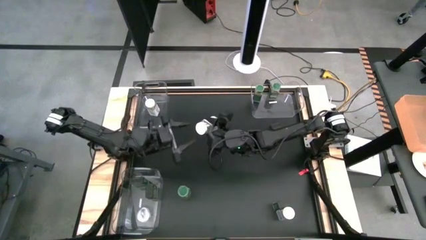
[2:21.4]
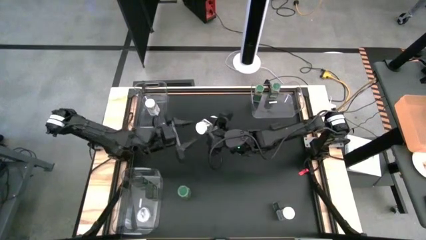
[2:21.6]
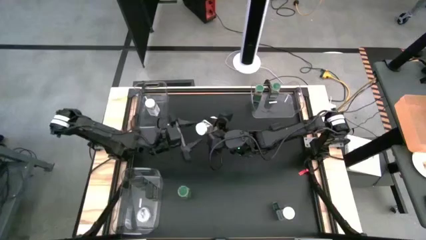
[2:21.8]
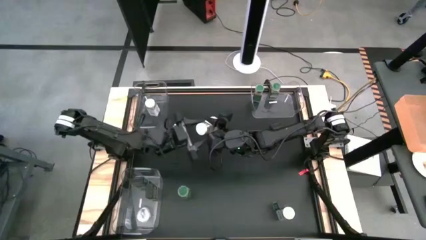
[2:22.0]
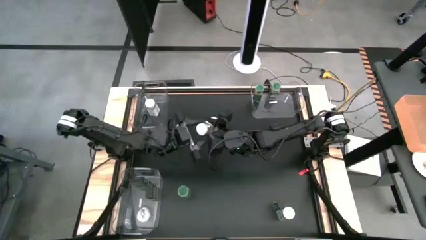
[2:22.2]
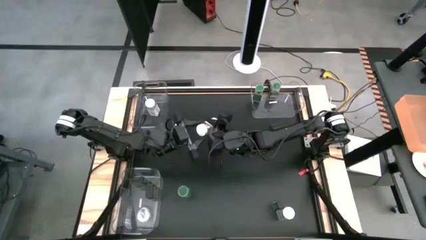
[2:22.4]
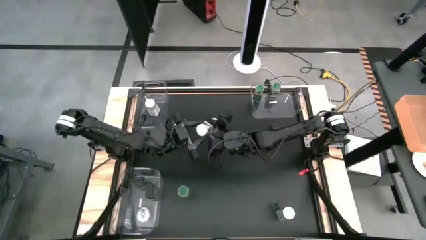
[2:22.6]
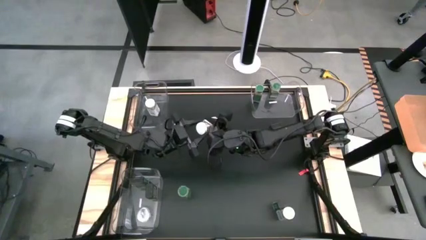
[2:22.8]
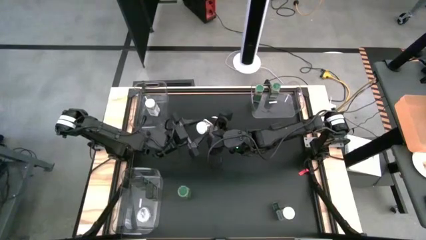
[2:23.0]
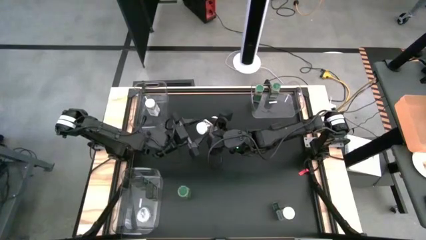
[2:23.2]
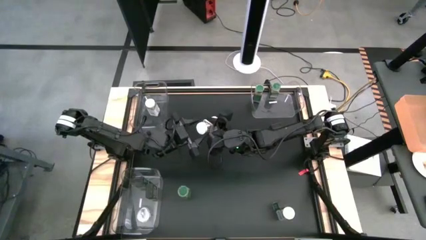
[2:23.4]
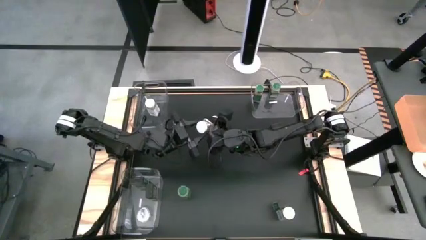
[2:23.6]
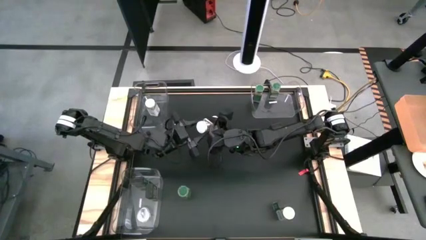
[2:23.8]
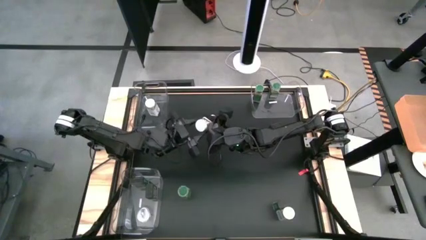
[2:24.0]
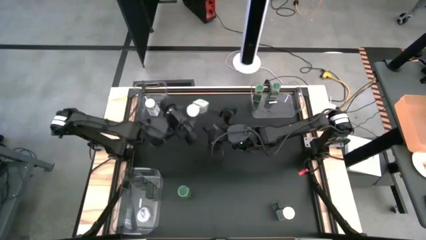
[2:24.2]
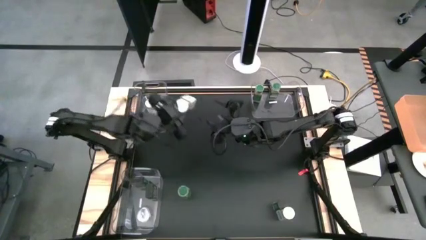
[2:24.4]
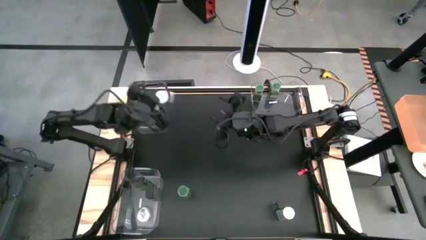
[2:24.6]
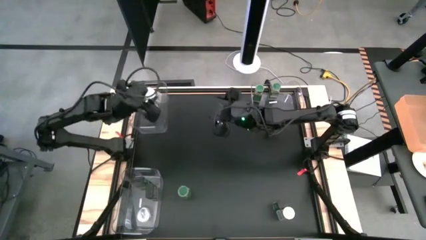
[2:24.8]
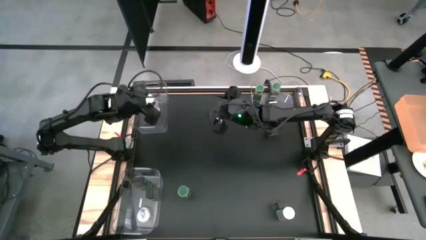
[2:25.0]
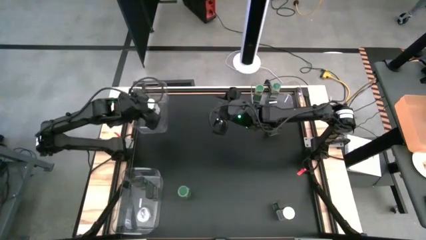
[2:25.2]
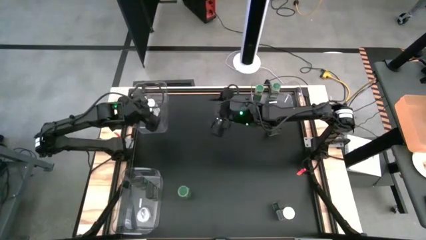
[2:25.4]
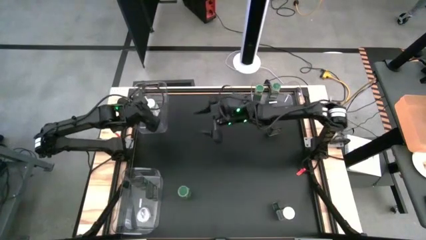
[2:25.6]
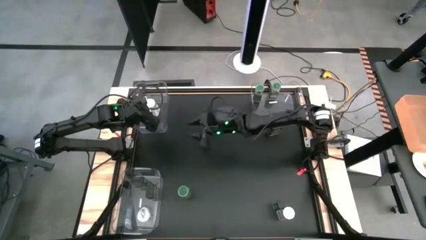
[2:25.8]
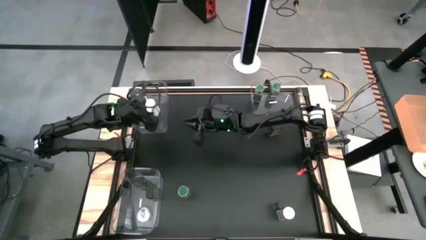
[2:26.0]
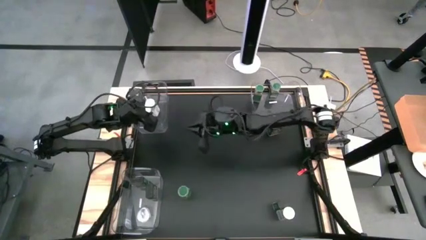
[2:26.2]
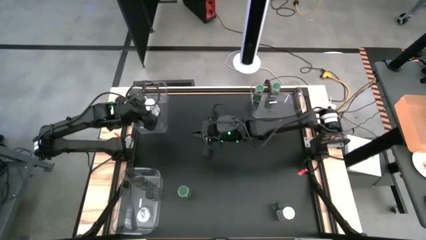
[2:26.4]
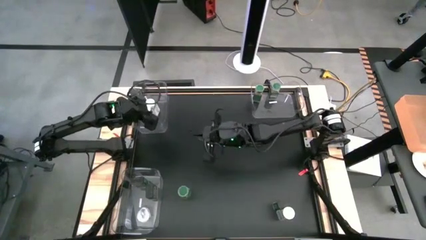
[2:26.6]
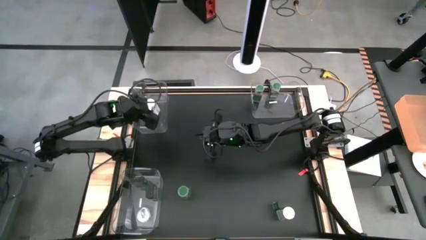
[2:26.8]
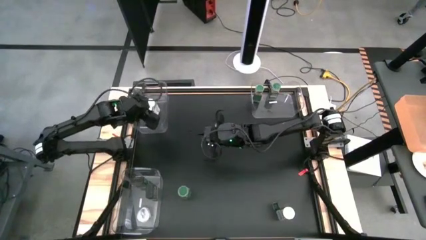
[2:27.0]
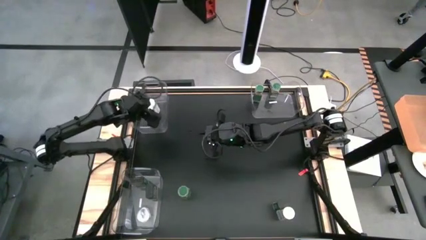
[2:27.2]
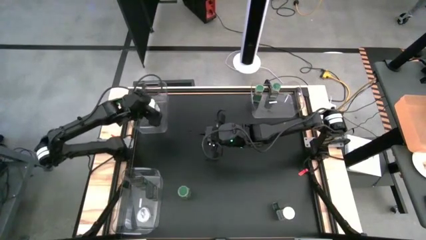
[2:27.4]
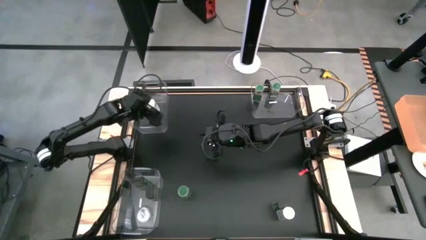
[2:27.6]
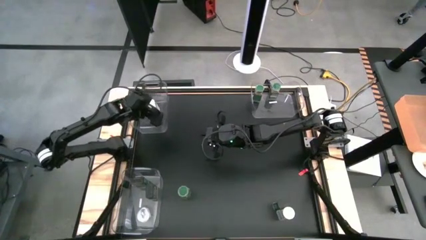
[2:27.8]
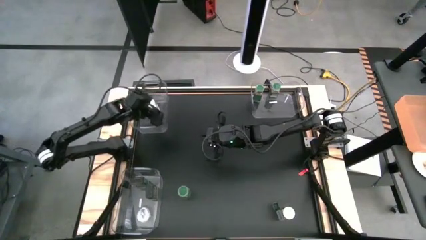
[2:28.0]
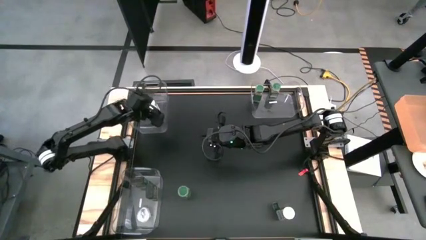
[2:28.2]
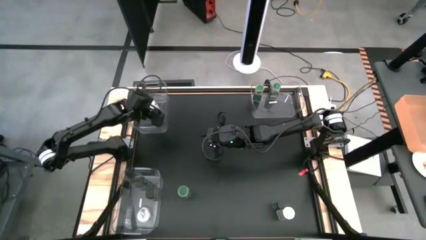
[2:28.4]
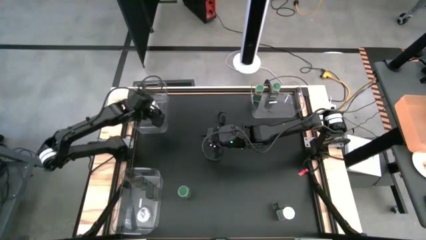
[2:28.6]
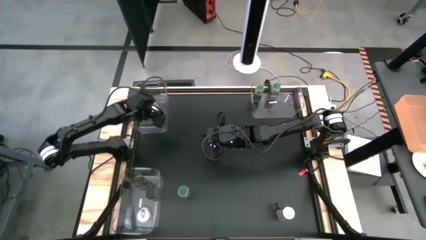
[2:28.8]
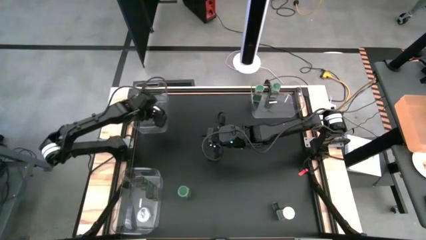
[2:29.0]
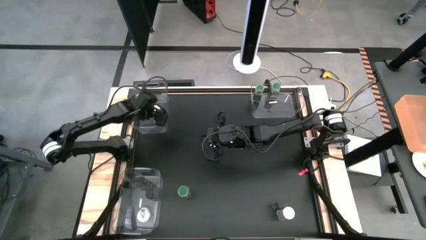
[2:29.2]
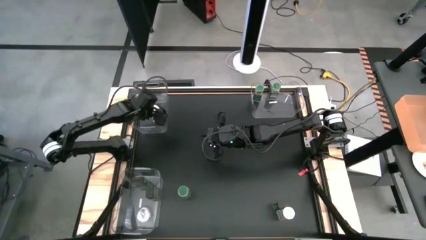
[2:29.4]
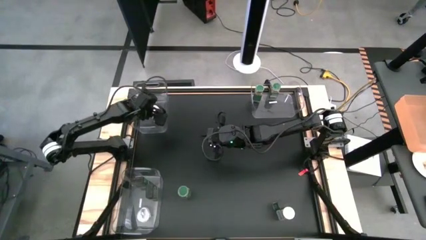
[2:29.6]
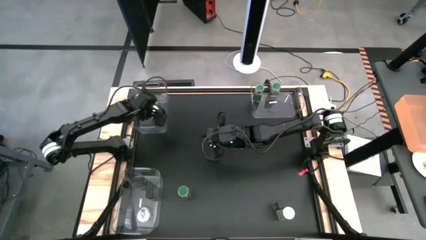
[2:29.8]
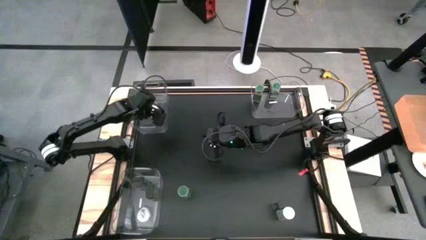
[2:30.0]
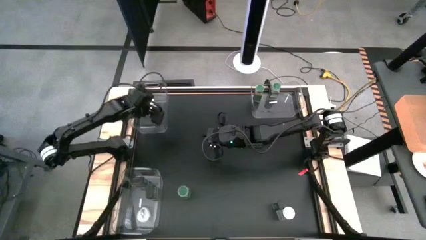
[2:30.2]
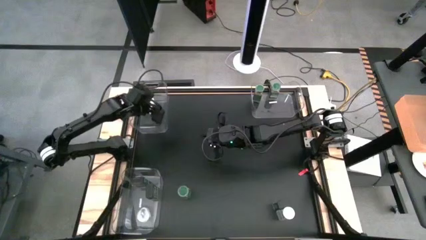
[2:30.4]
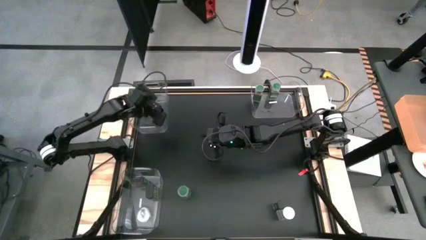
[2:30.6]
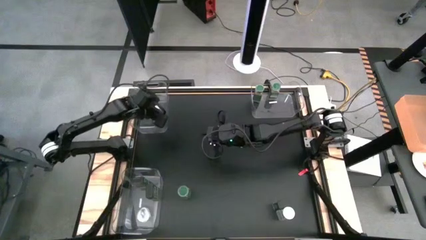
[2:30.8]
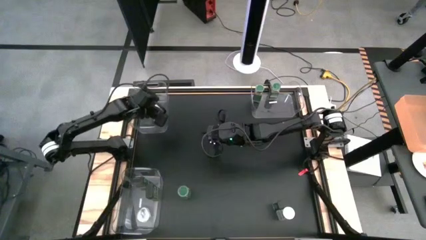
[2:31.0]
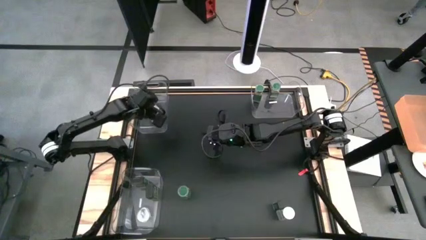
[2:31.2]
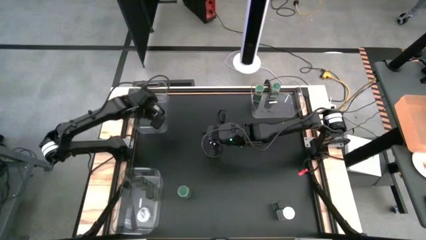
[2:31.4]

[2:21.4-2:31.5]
Task: Sort spices by type
Put the top white seasoning bottle into the top left transparent bin

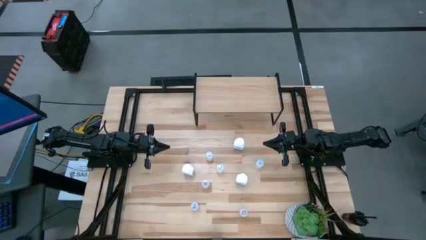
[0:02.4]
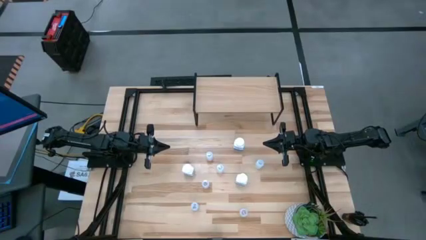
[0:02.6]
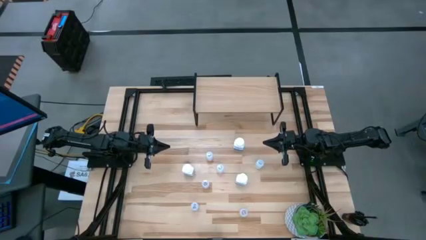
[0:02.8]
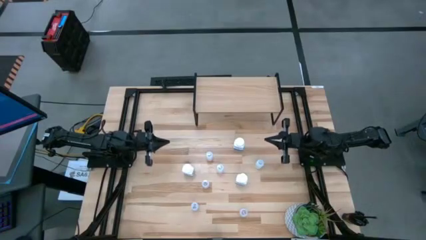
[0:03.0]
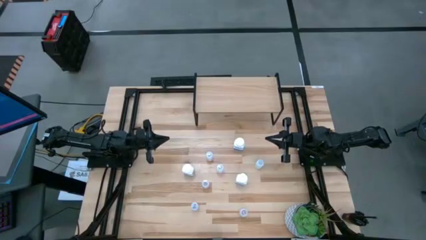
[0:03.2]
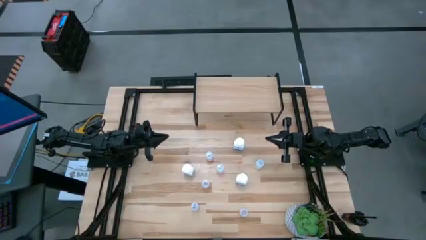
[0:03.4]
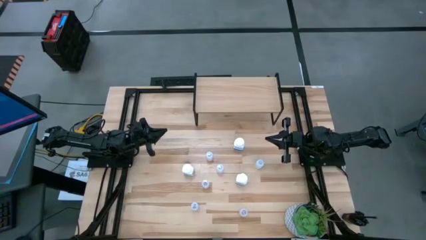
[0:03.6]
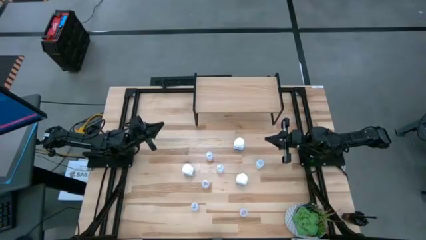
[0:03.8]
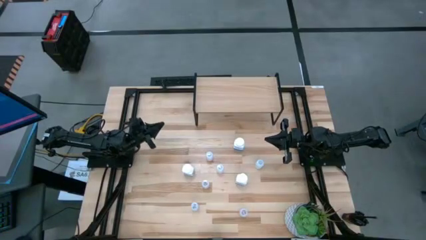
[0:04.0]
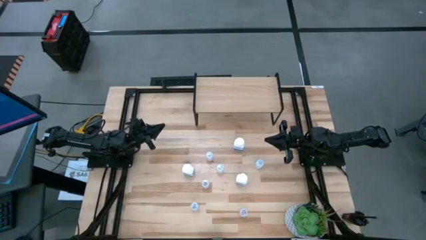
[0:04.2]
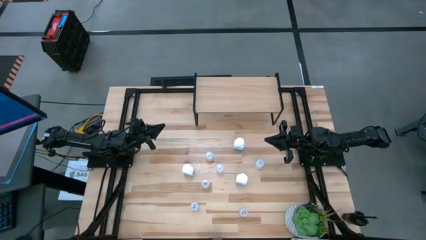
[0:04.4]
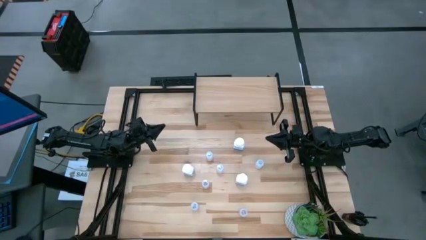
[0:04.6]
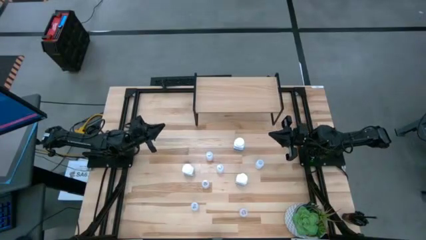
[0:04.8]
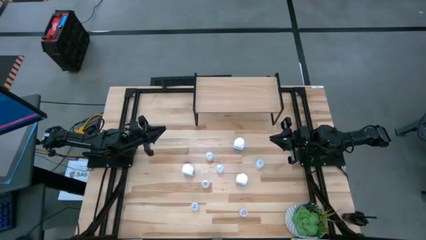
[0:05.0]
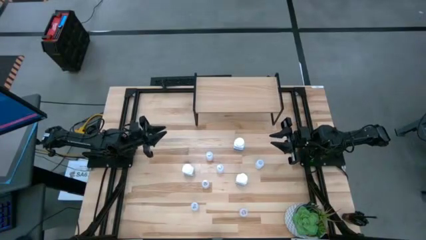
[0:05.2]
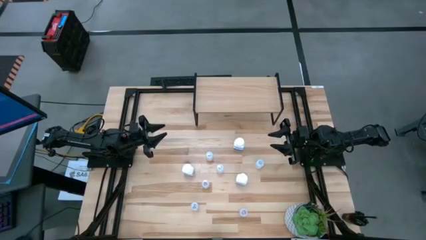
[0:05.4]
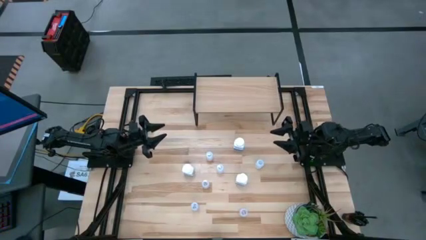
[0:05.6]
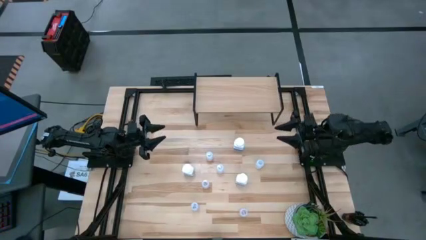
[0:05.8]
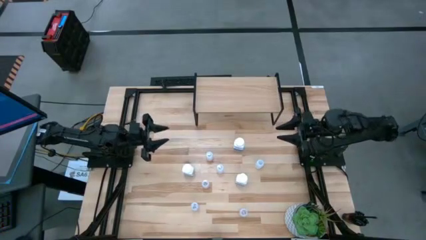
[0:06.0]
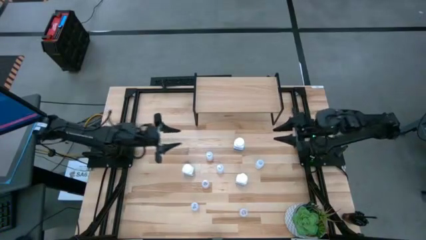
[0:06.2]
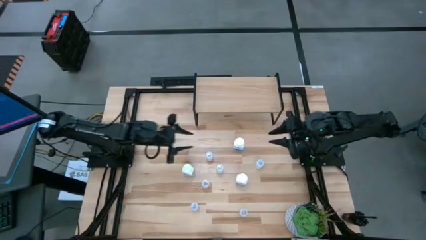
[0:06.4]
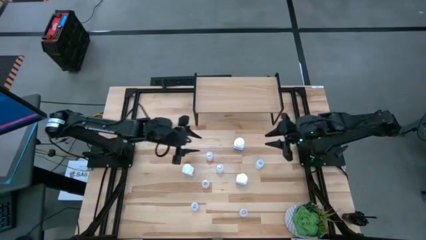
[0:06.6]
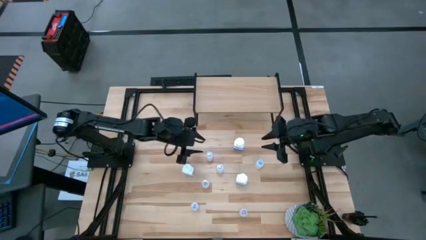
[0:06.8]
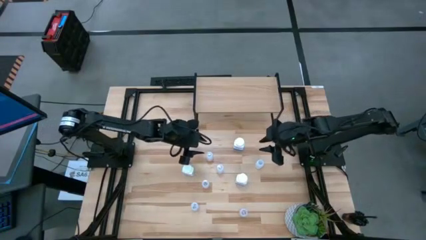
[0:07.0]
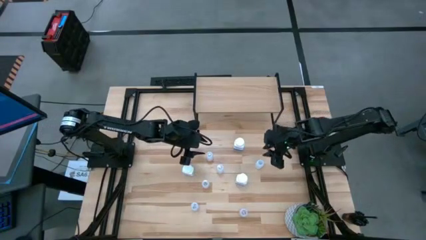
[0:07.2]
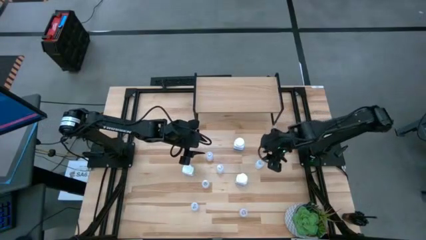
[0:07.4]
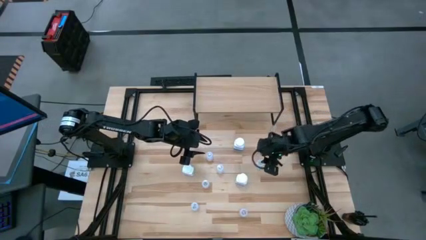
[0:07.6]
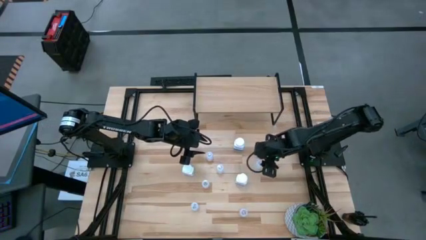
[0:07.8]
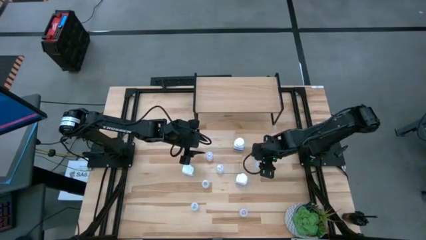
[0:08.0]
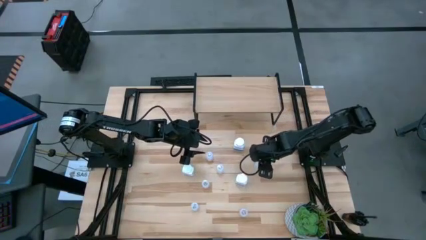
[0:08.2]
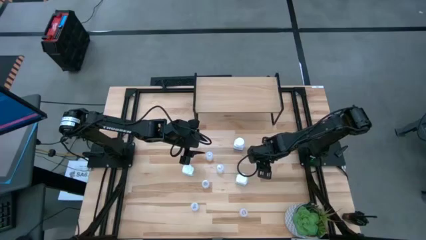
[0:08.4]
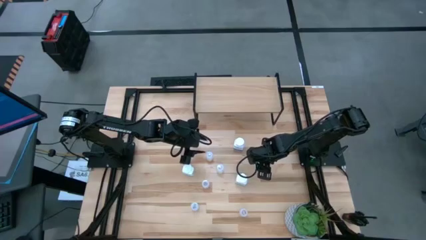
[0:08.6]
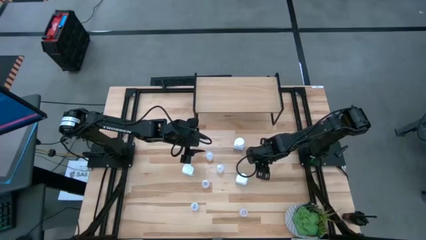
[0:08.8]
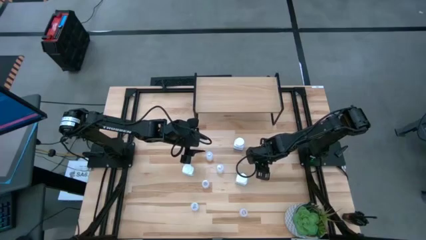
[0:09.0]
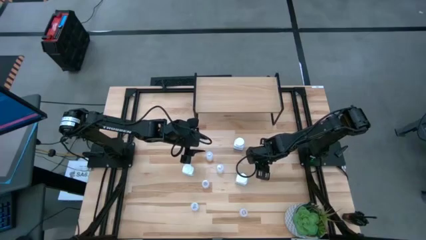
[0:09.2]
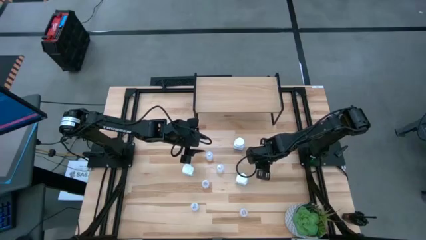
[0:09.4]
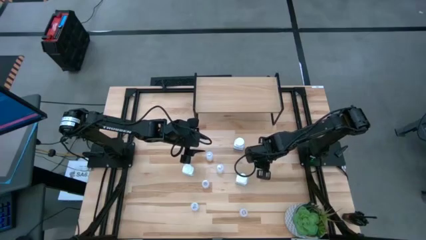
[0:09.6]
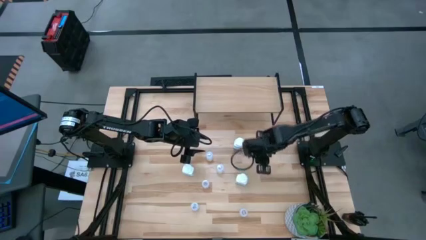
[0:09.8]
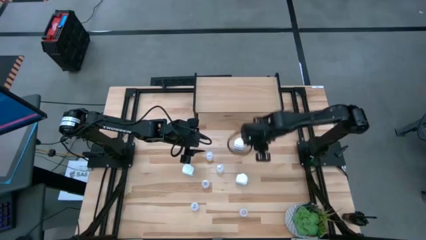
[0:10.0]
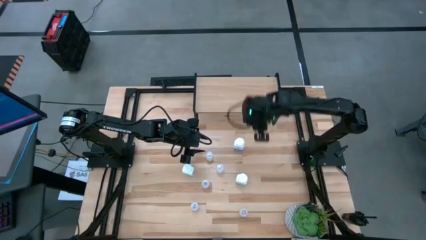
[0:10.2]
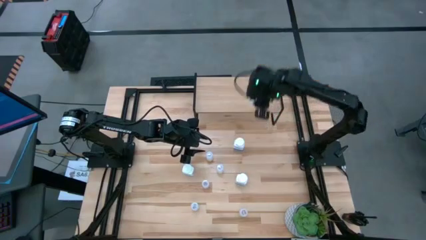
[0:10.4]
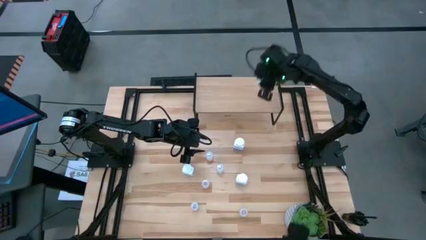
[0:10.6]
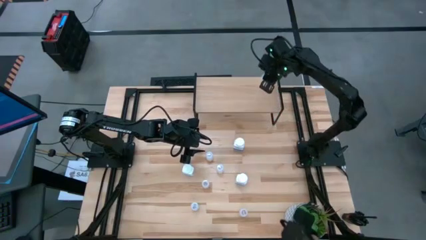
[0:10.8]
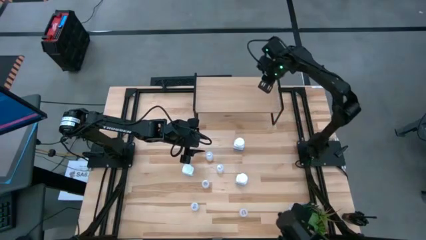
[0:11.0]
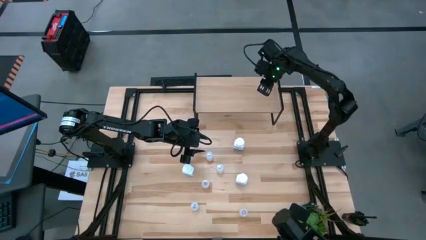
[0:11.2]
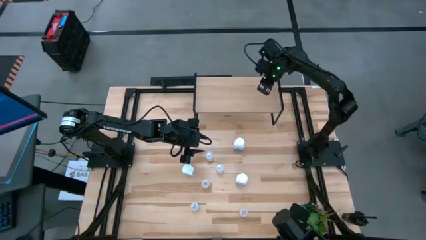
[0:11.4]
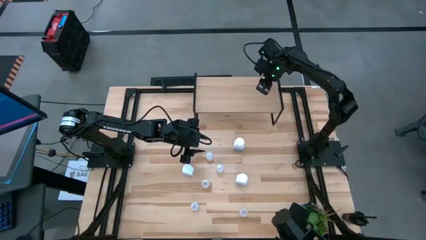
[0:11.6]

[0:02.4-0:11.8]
Task: Pick and place medicine bottles onto shelf by color
Put the top right white pill bottle on the shelf
